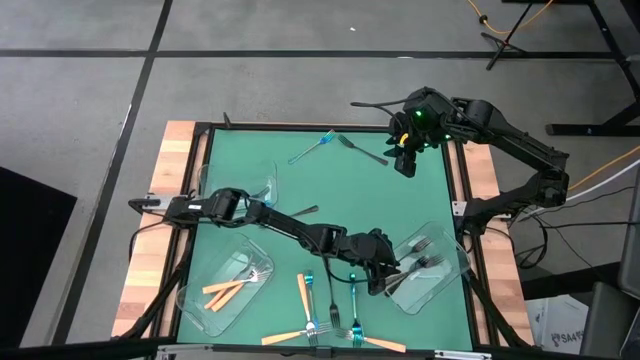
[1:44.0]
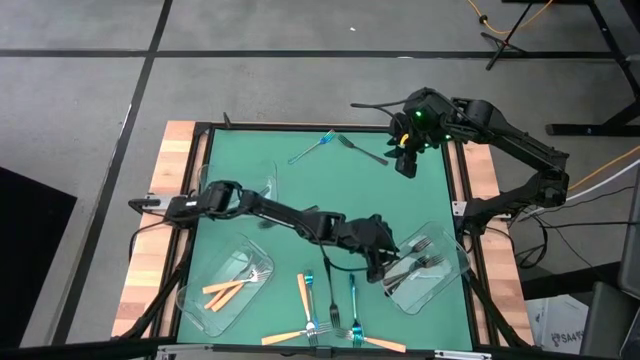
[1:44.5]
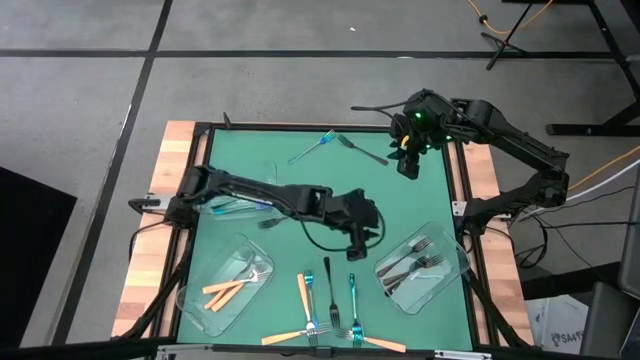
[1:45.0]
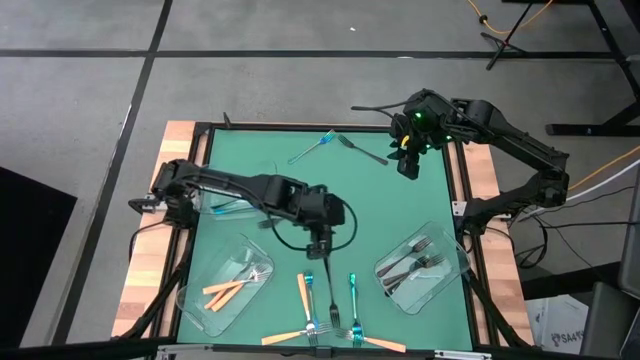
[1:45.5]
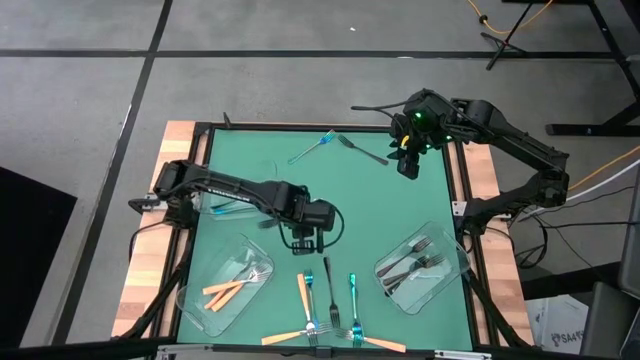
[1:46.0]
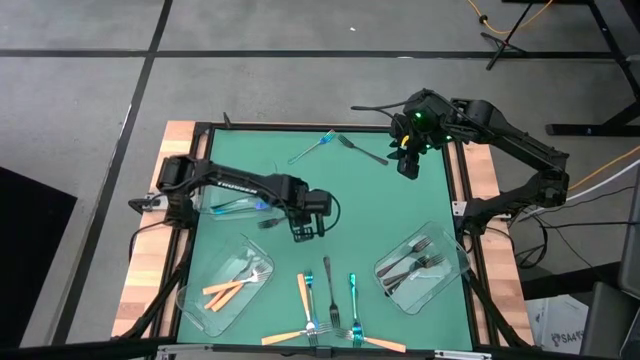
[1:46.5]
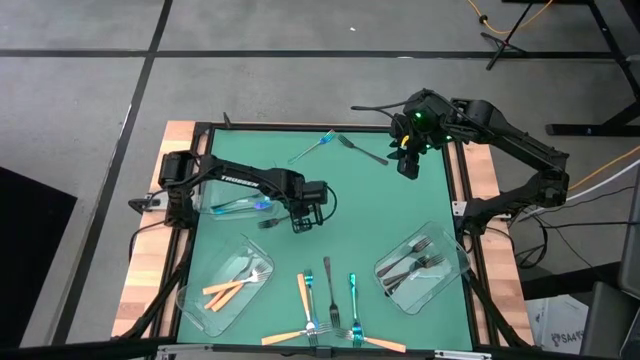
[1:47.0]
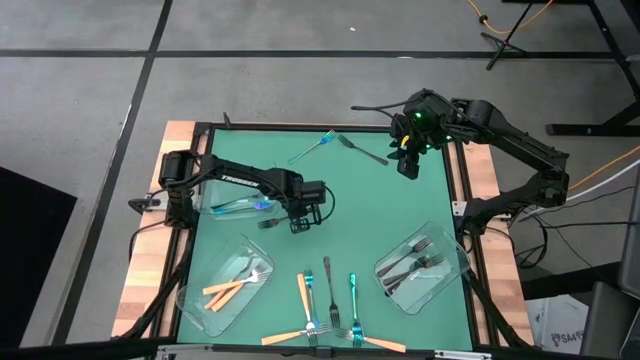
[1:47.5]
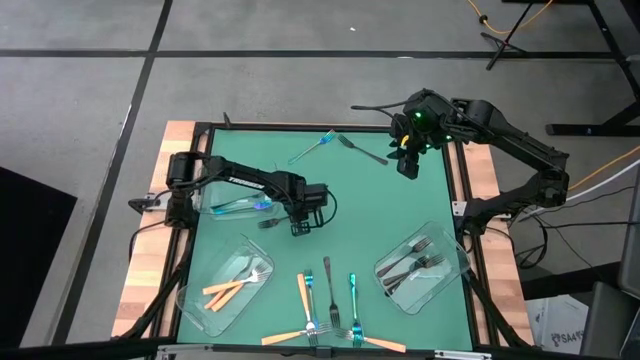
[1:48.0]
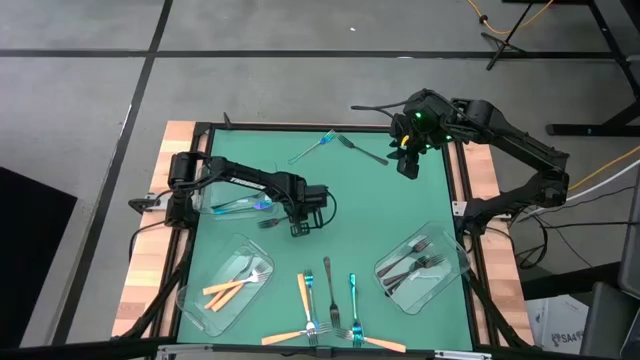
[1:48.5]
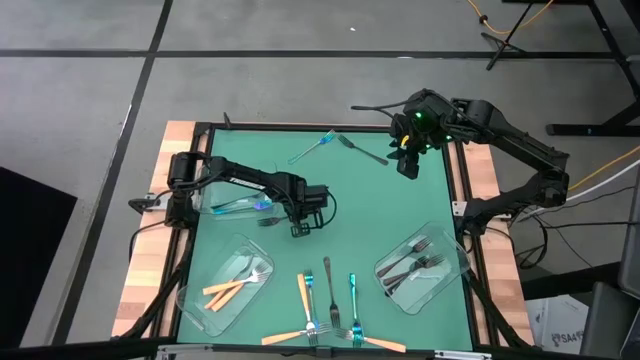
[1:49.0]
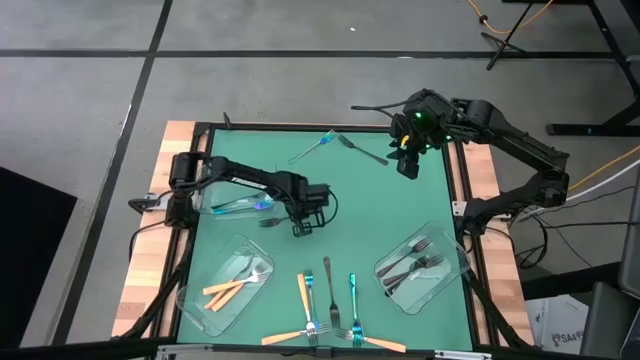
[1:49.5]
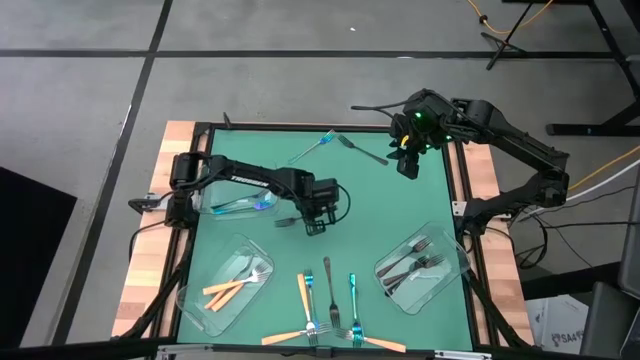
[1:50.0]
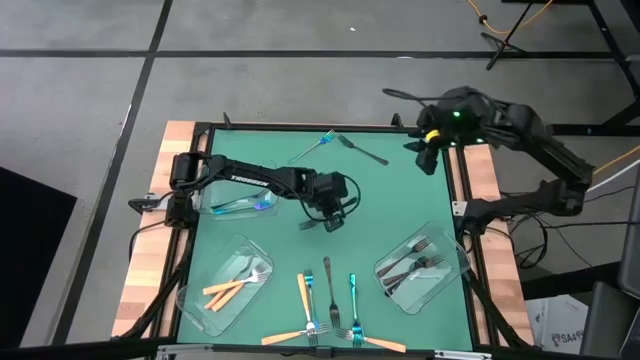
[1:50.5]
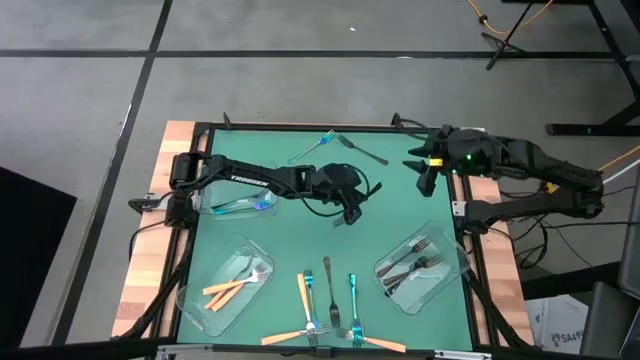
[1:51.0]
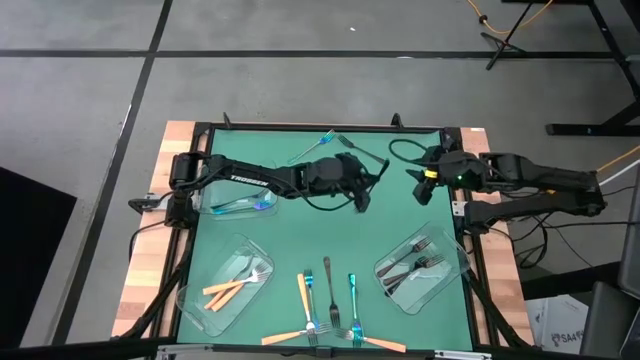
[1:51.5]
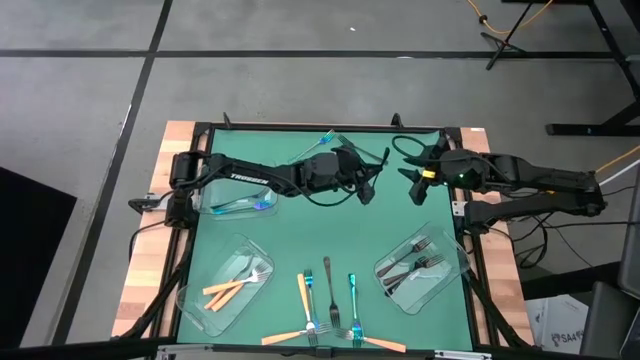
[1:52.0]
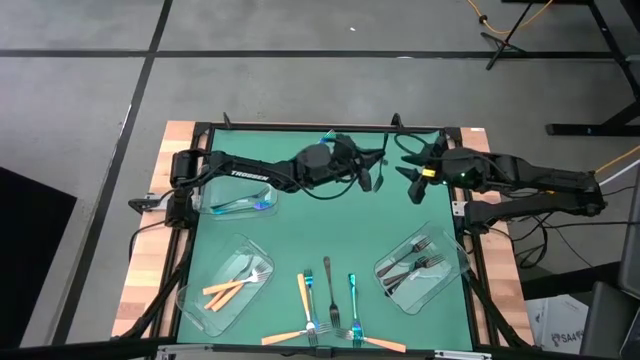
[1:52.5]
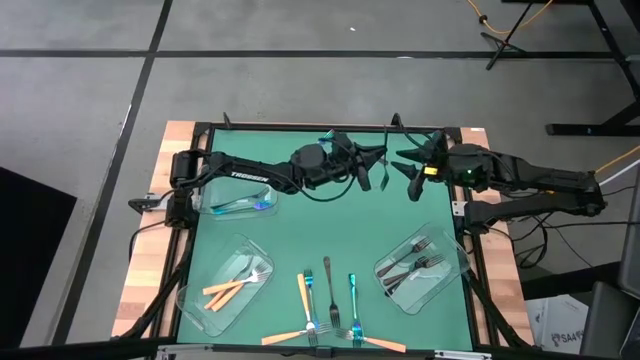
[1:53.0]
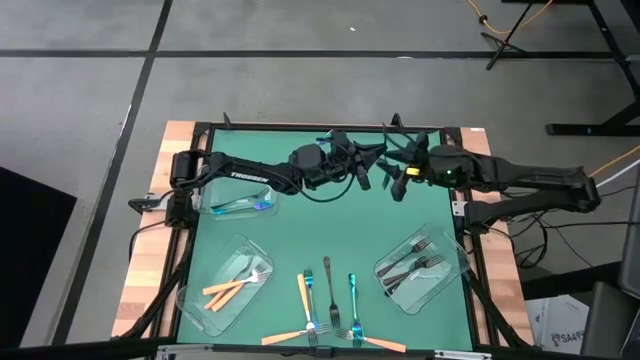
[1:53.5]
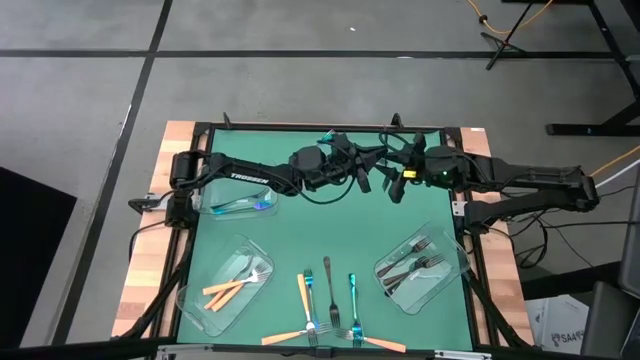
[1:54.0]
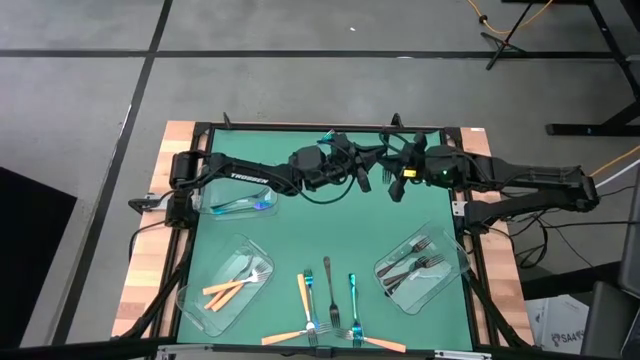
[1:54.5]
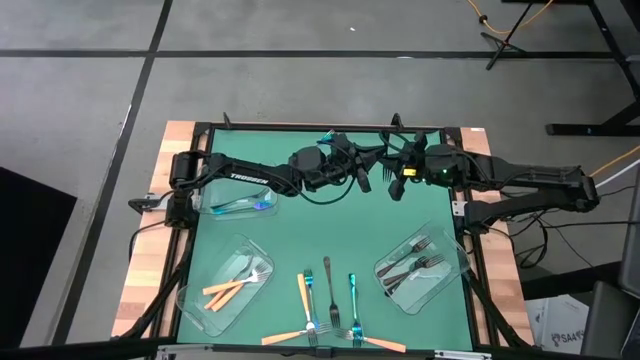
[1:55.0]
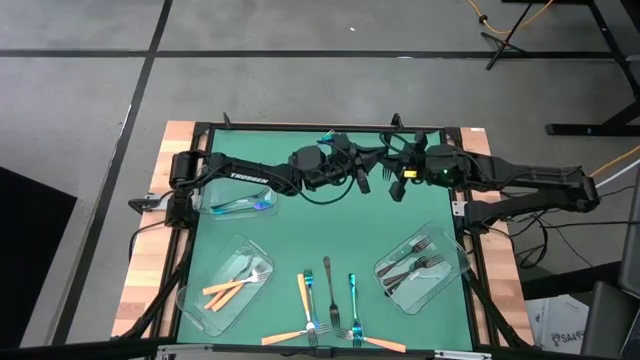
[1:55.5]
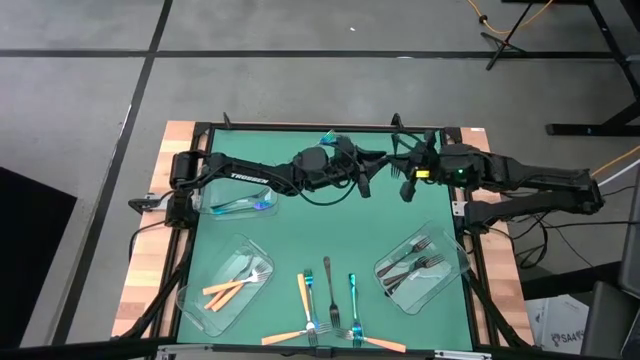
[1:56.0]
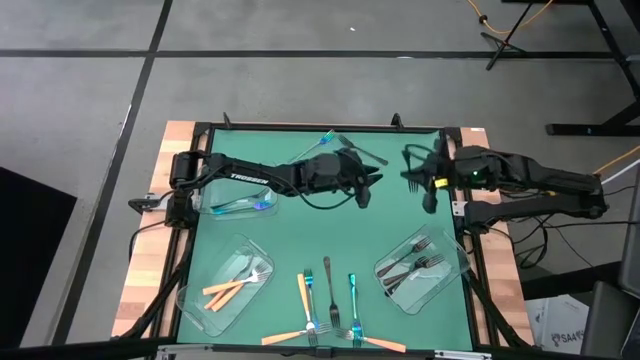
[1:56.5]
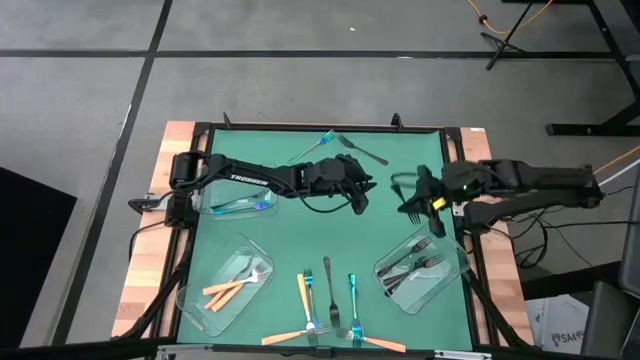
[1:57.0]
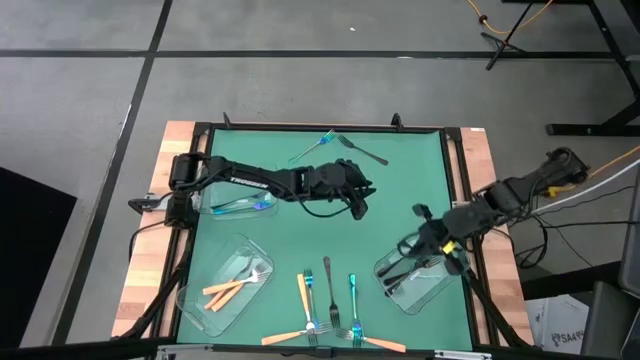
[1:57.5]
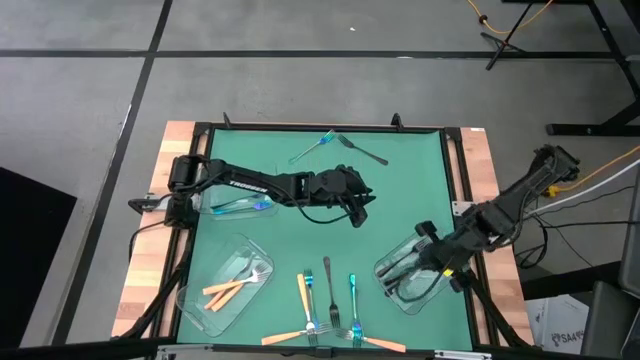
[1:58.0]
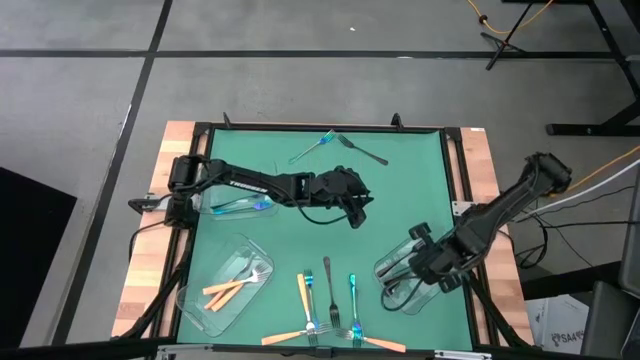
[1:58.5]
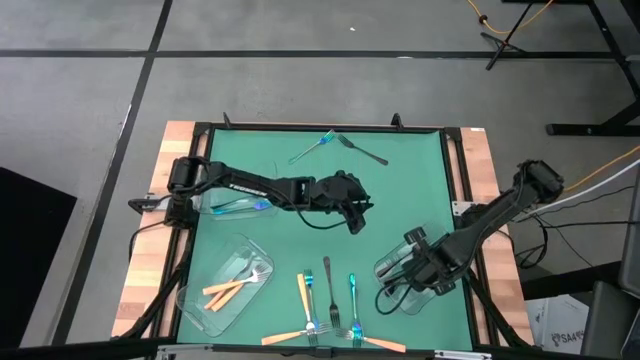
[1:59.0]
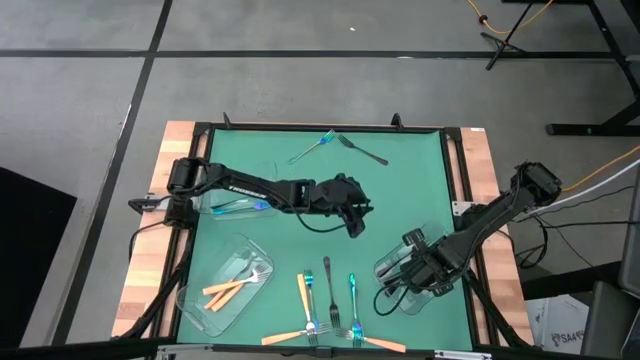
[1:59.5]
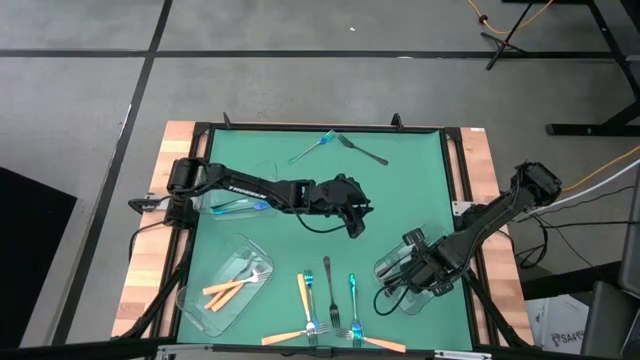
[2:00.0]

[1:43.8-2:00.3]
Task: Sort silverware by color (type)
Put the middle black fork into the bottom right transparent bin

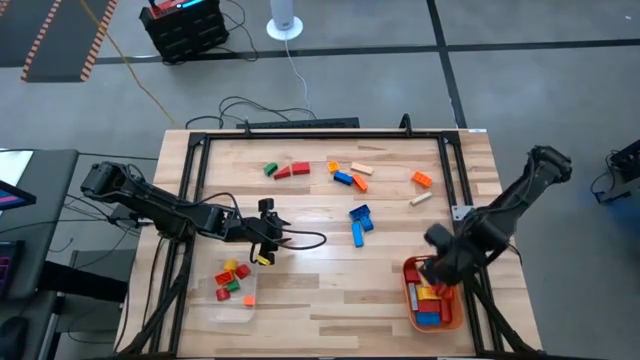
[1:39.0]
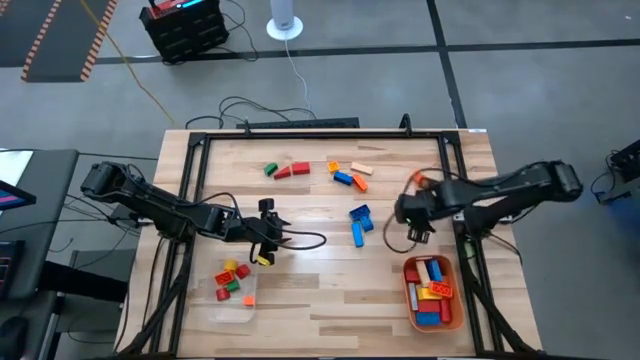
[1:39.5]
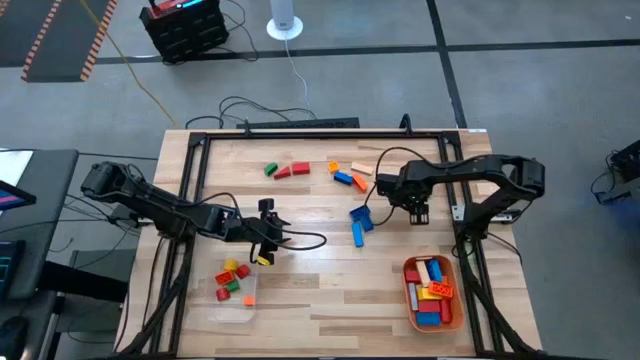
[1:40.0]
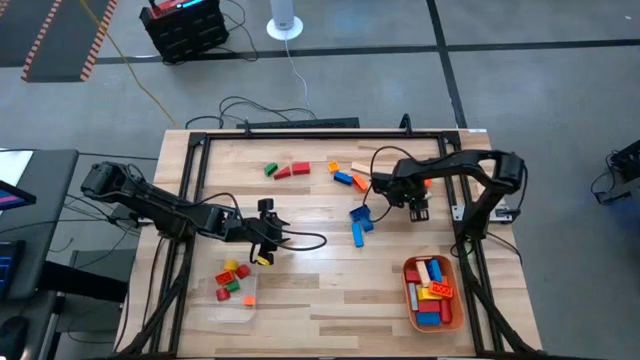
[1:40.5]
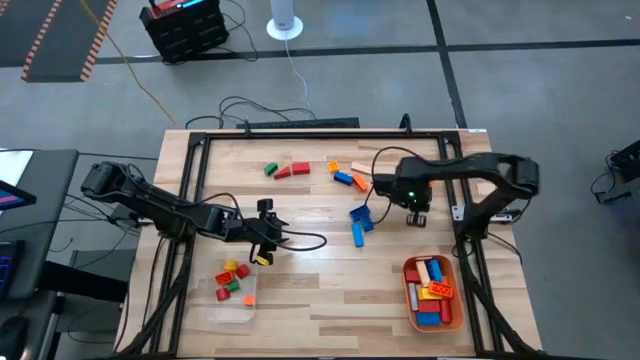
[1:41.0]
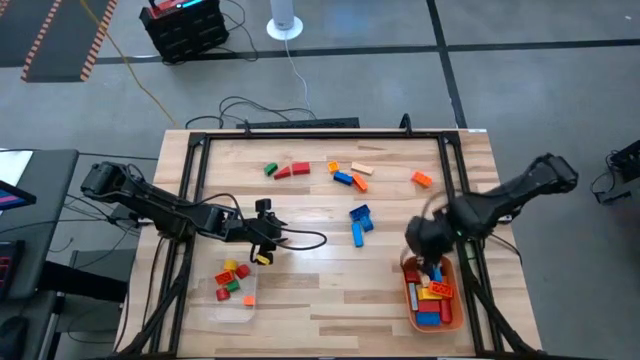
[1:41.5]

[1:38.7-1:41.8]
Task: Sort blocks by size
Put the large brown block into the orange bin

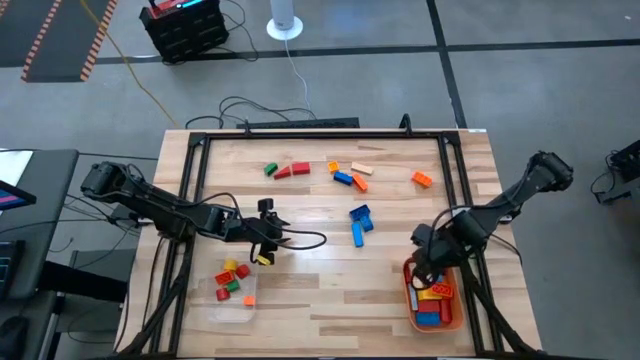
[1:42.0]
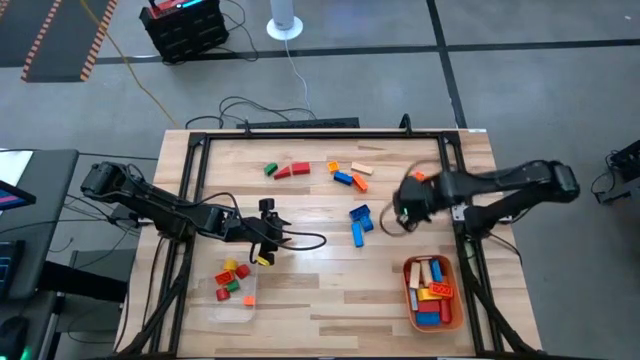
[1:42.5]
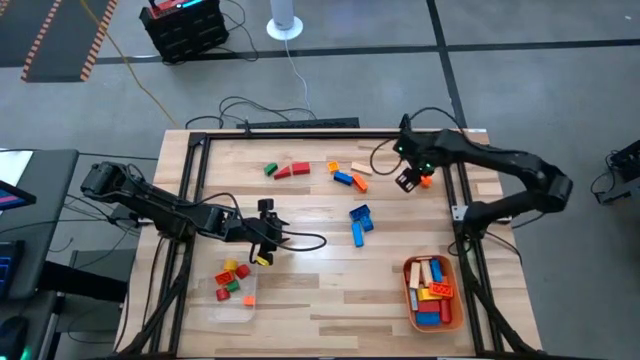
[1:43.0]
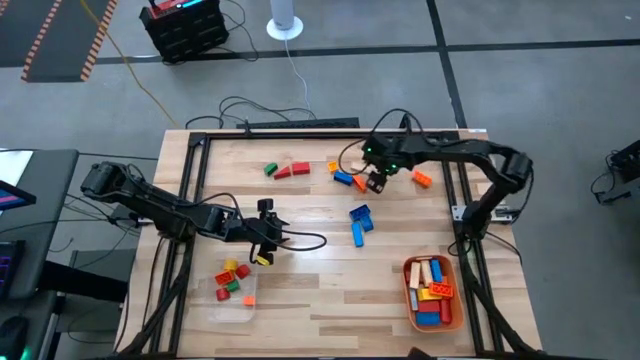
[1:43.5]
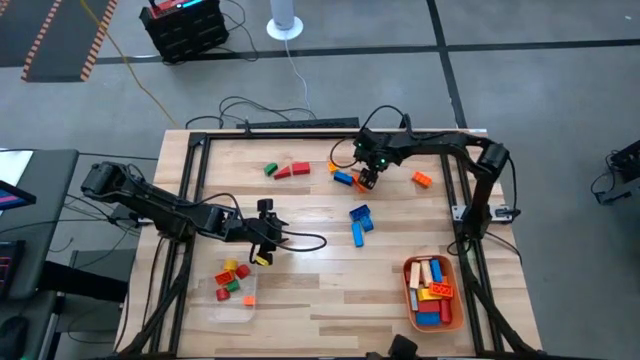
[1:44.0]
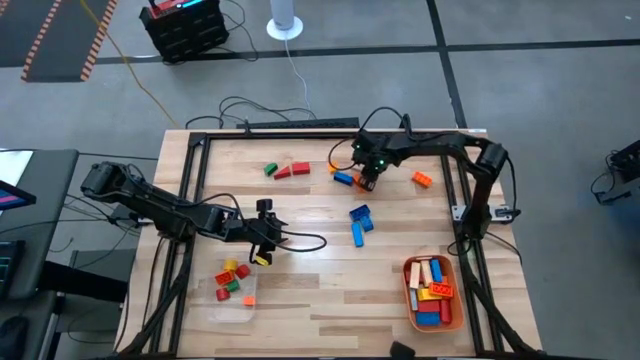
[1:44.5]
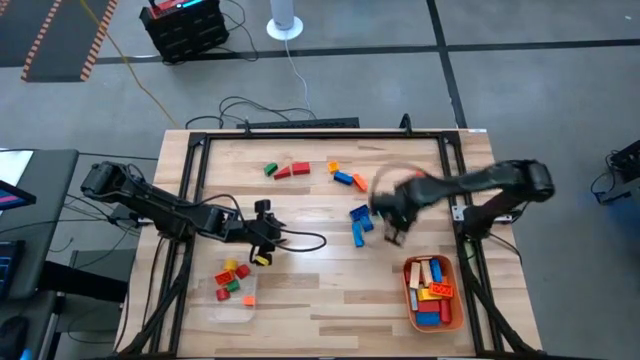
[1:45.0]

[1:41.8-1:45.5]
Put the large brown block into the orange bin
